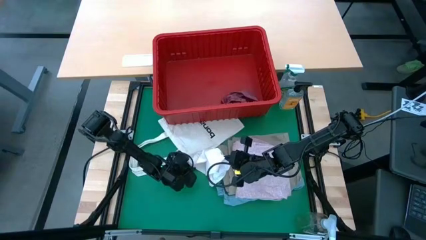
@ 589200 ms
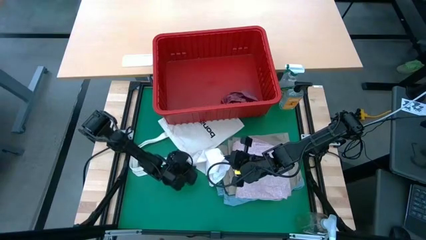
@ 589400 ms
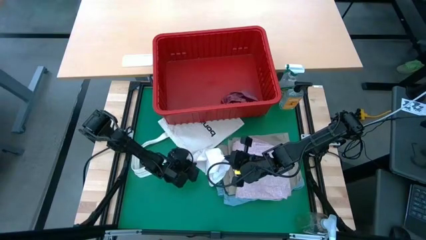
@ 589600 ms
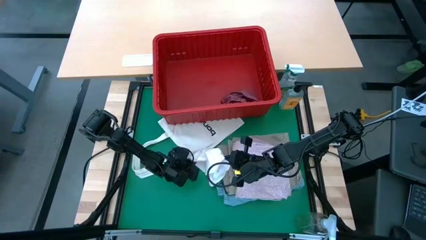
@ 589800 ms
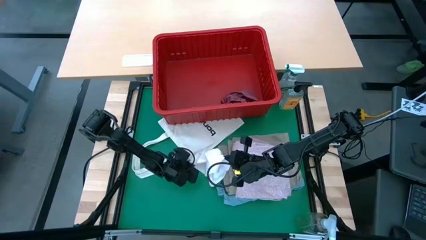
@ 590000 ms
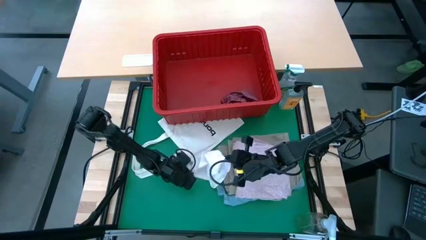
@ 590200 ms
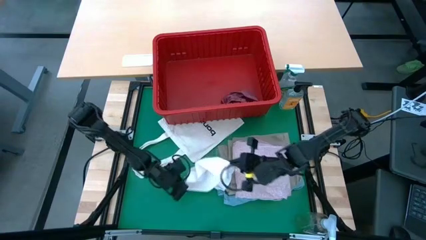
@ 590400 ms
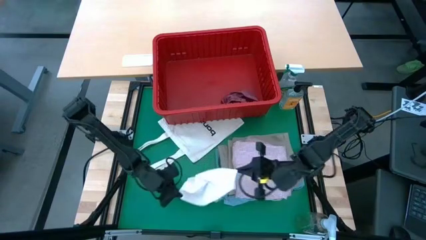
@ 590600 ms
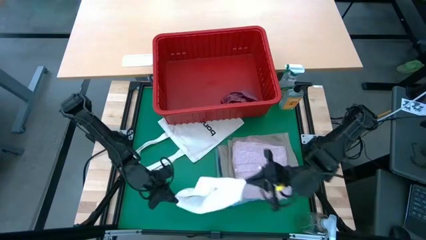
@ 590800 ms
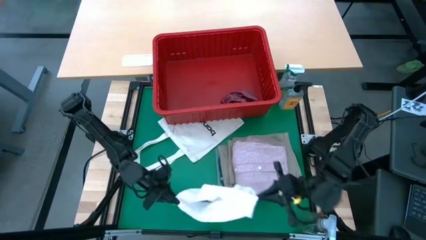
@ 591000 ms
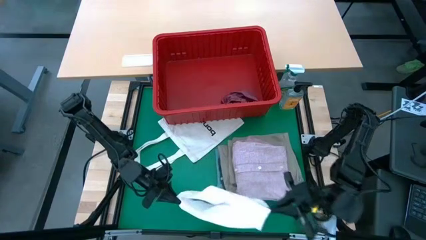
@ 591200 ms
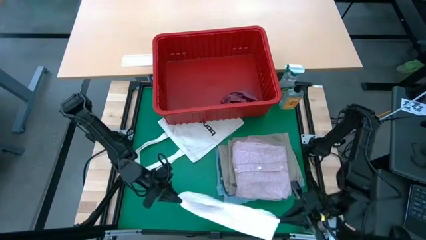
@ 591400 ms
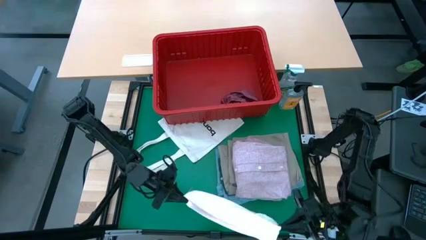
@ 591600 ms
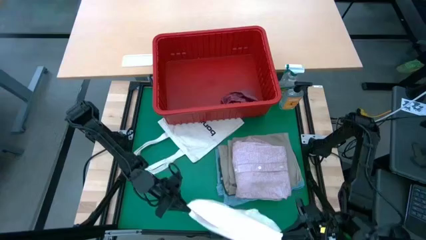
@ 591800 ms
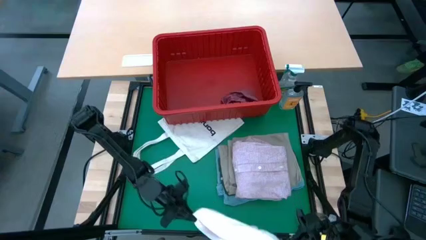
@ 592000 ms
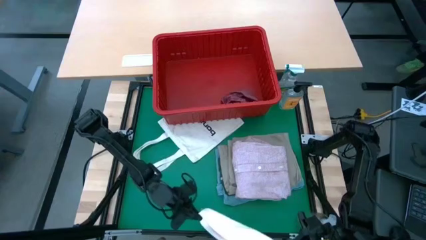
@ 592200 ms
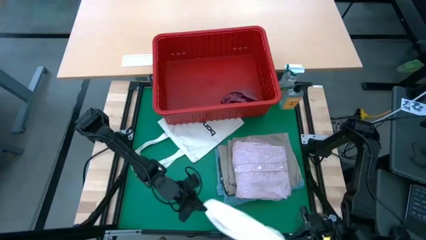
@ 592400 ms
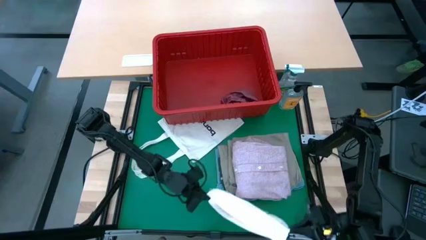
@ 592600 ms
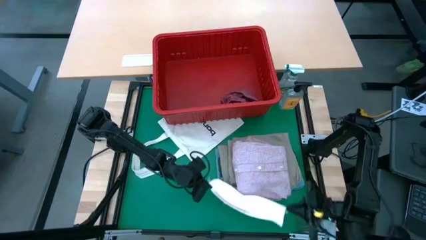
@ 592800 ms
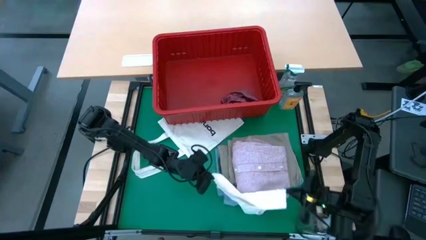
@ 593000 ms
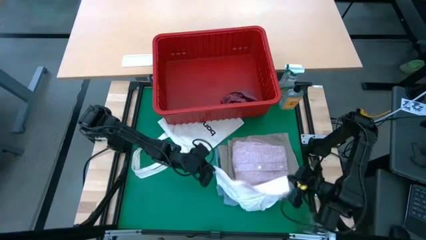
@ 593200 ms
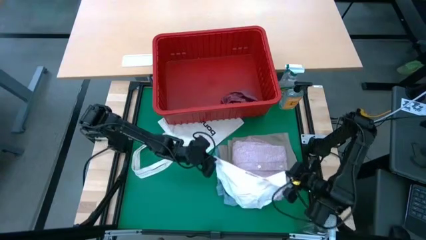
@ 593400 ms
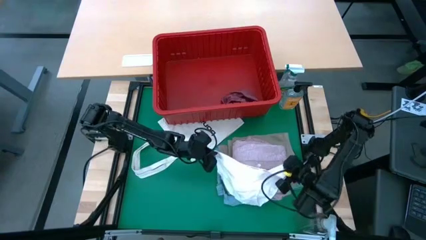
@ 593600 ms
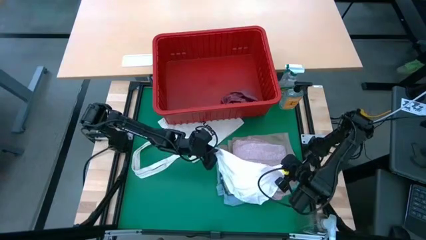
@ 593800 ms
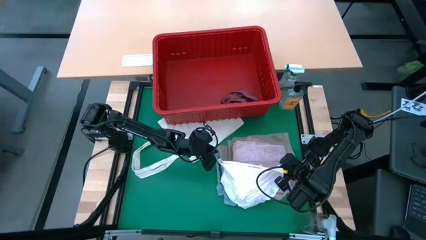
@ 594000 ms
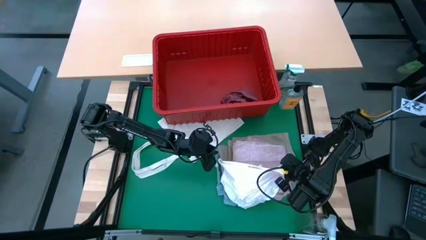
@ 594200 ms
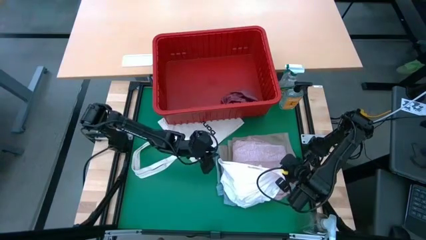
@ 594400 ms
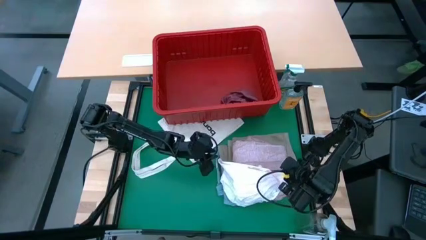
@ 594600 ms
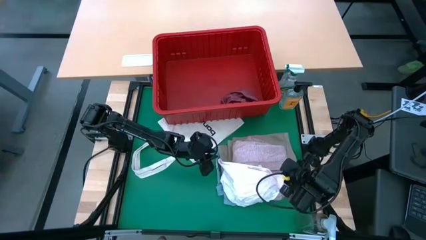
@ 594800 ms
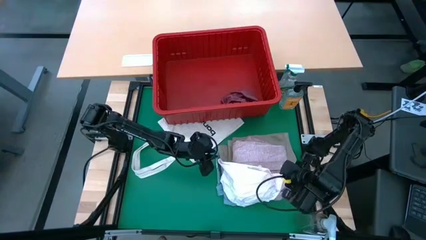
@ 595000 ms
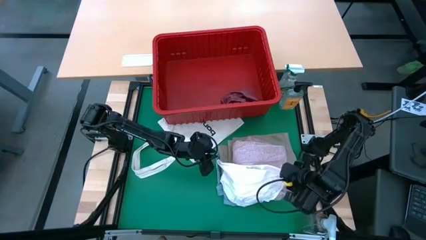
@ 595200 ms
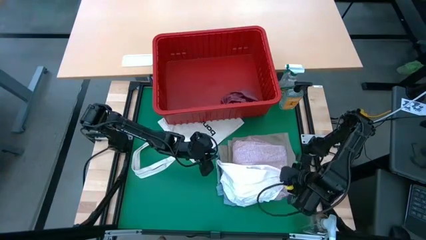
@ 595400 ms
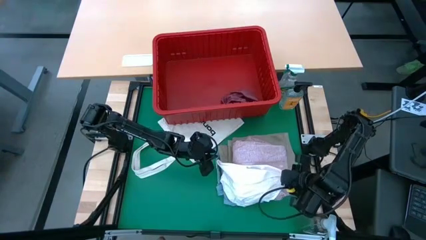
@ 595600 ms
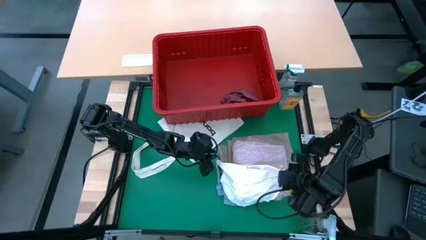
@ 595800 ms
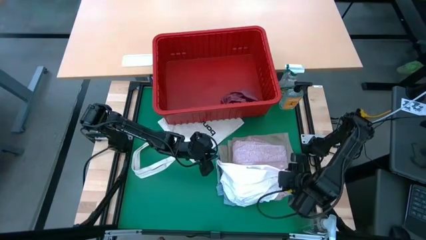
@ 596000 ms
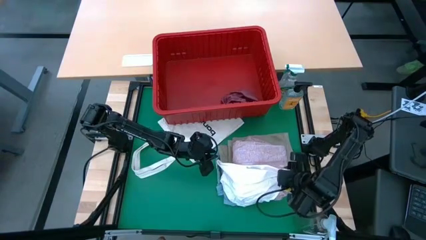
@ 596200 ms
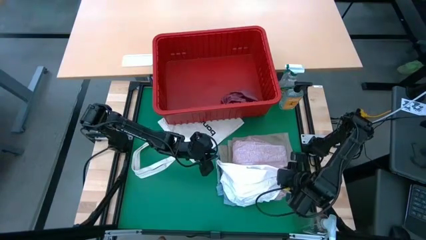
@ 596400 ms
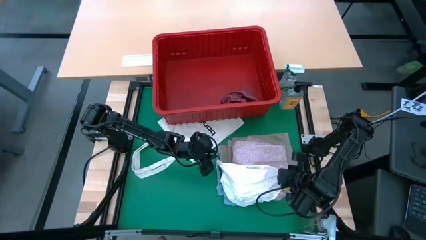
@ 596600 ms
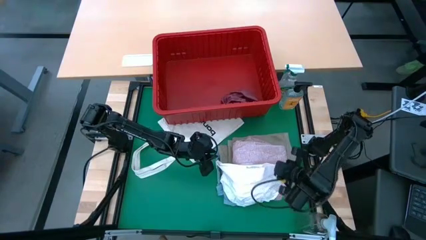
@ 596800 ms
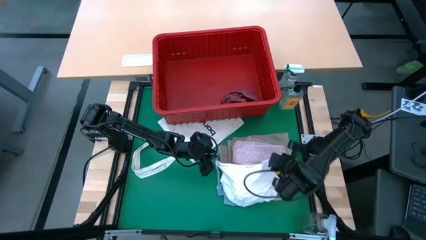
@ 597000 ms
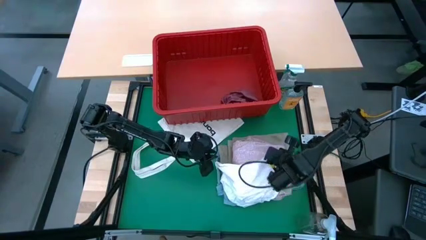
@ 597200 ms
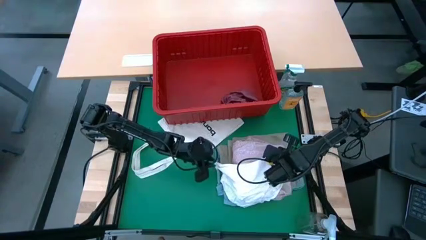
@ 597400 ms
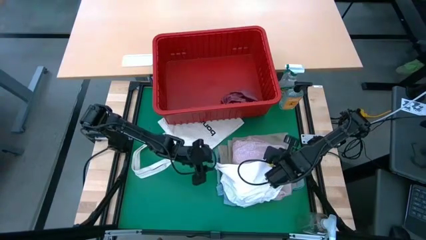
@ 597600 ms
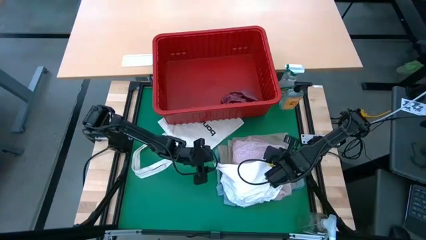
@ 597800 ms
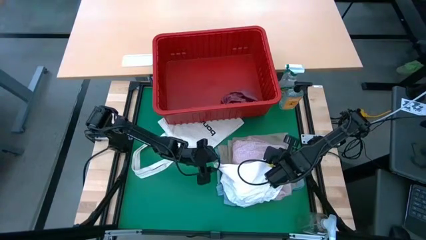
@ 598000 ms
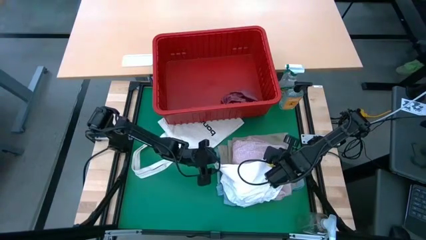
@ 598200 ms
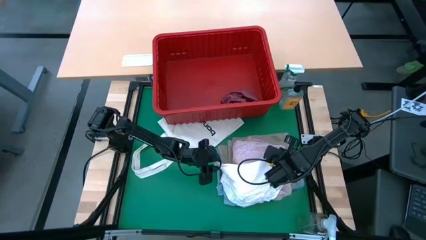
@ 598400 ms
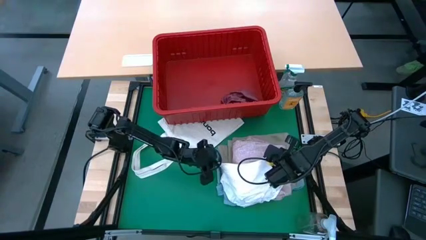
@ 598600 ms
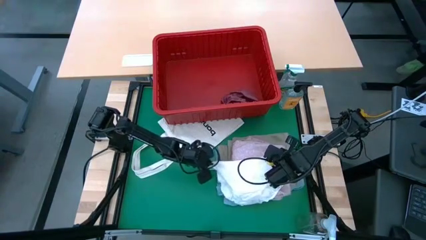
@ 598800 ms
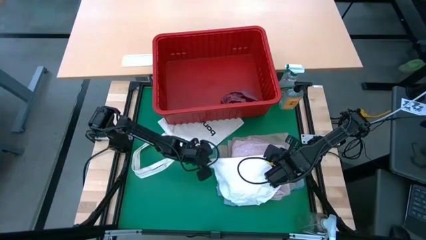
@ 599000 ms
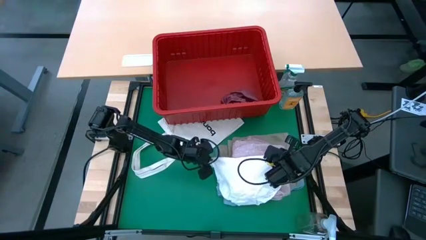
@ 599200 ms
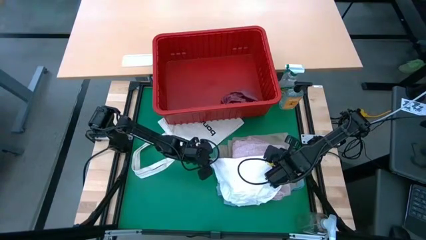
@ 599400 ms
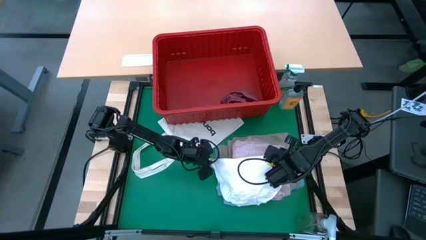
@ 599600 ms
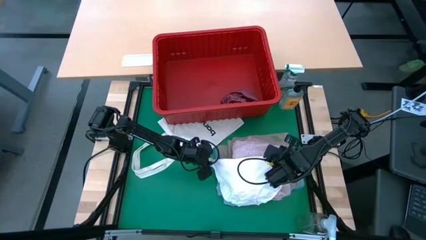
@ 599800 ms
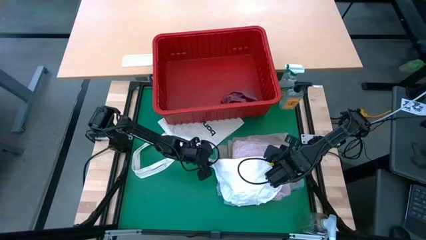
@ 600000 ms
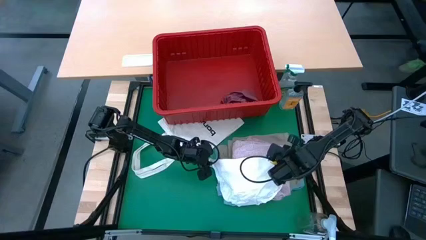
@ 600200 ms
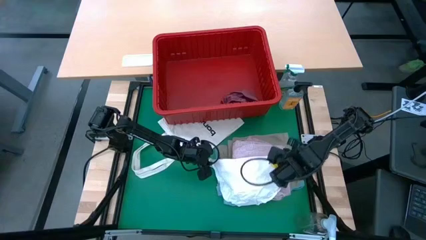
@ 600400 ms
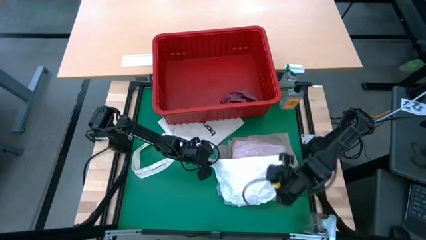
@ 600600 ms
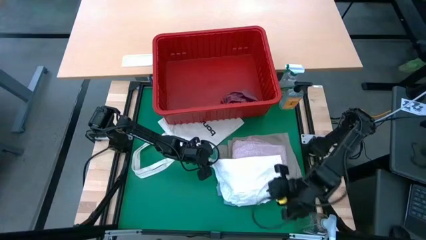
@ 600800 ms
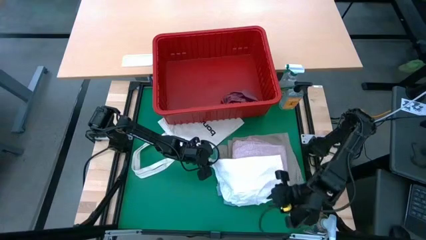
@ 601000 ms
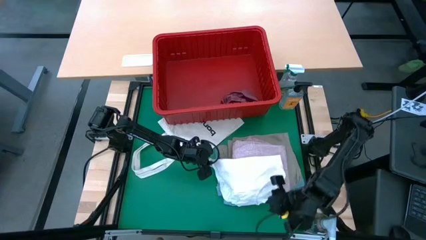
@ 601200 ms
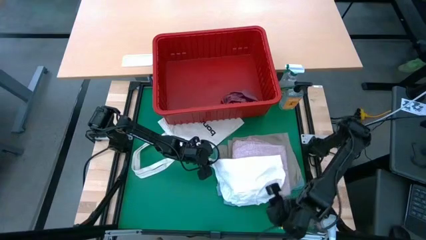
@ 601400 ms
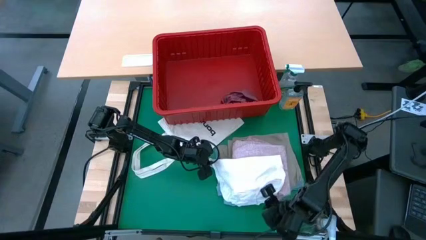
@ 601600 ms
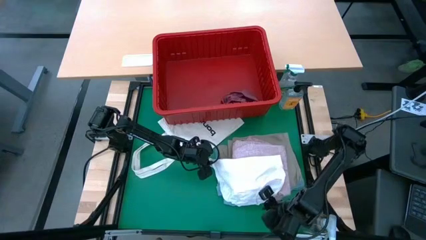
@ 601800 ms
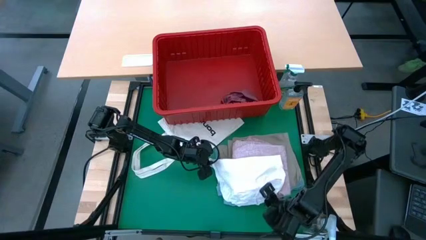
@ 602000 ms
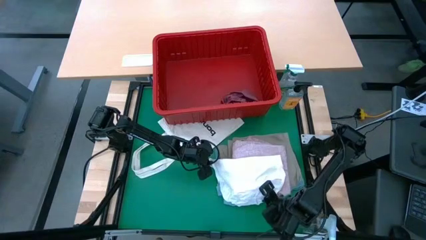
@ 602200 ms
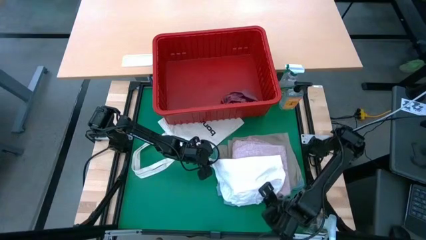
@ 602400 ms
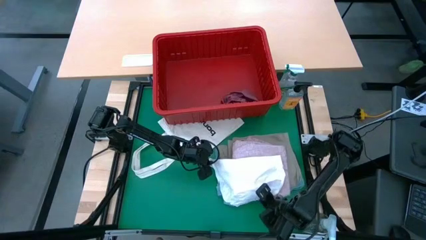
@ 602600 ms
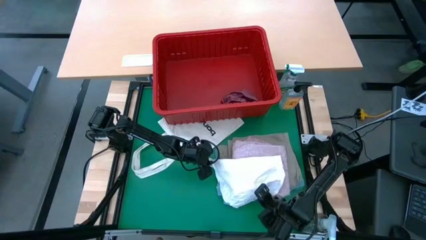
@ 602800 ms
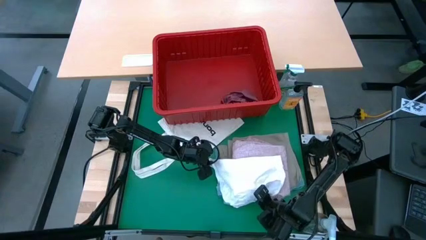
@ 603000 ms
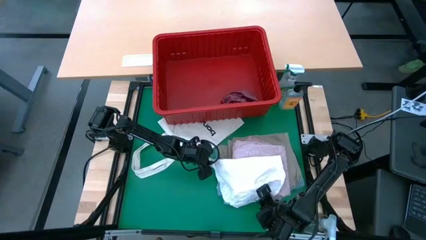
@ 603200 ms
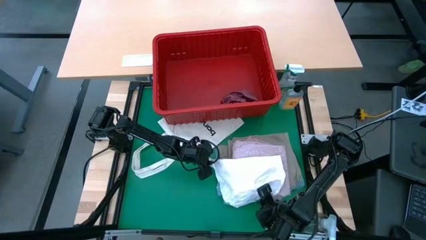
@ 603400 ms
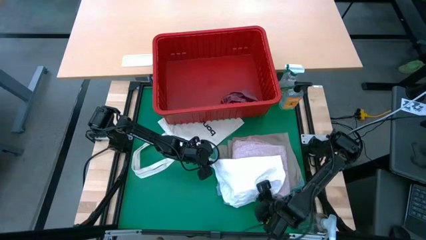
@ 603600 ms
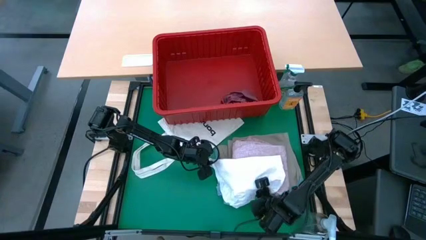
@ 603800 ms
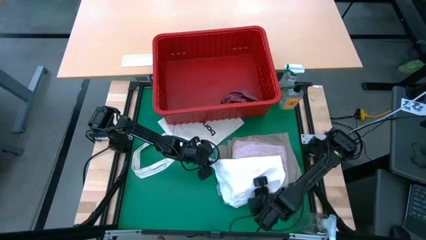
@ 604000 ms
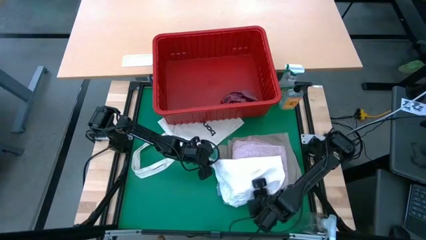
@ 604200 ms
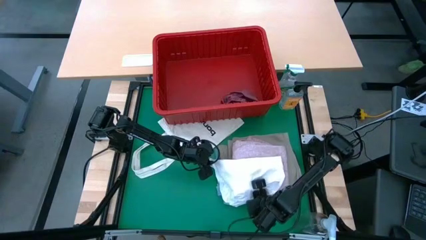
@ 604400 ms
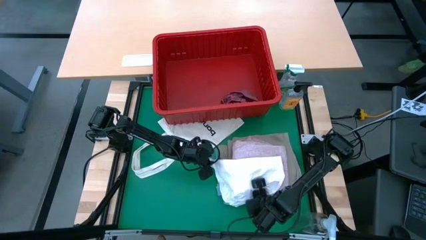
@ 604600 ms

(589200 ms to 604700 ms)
Task: Fold laundry
Fold the white underwear
